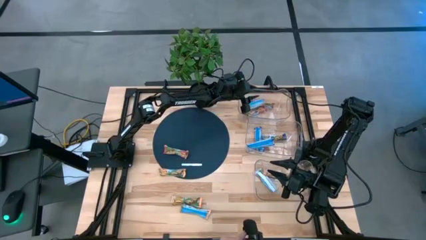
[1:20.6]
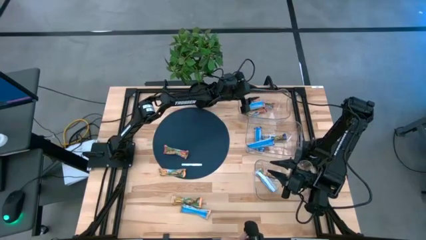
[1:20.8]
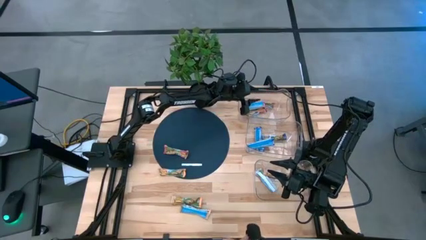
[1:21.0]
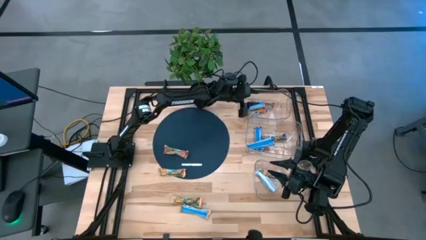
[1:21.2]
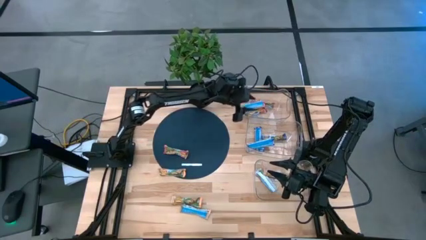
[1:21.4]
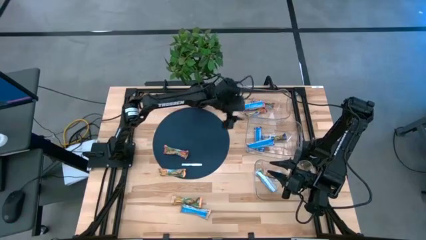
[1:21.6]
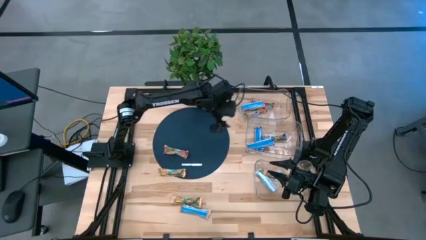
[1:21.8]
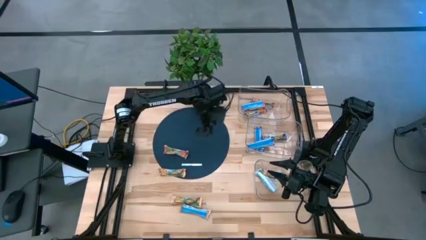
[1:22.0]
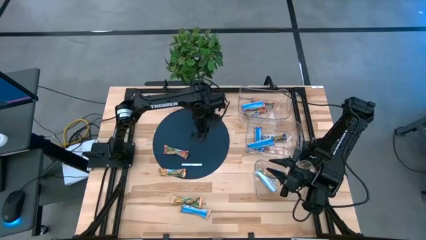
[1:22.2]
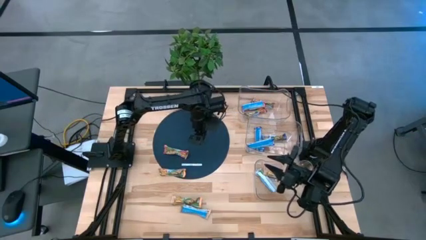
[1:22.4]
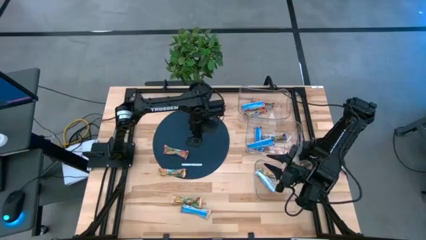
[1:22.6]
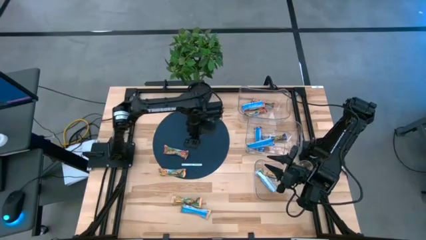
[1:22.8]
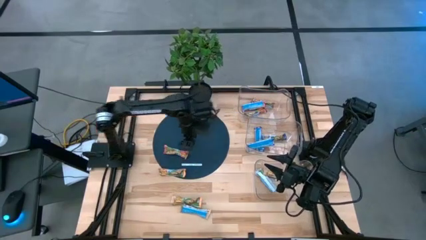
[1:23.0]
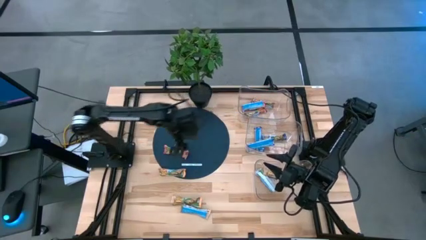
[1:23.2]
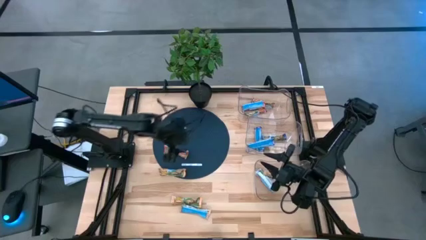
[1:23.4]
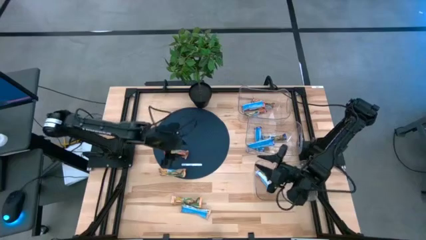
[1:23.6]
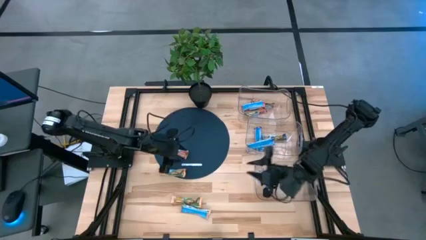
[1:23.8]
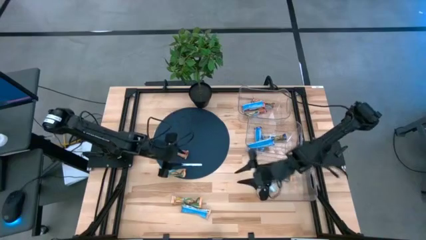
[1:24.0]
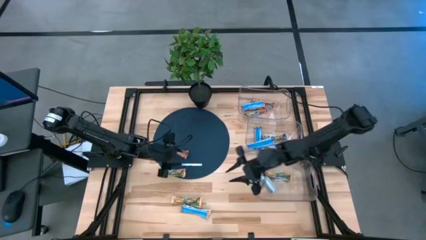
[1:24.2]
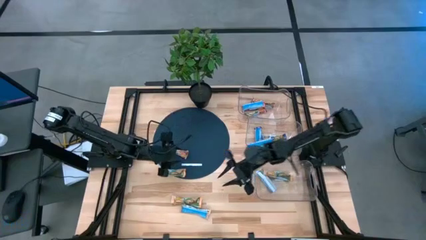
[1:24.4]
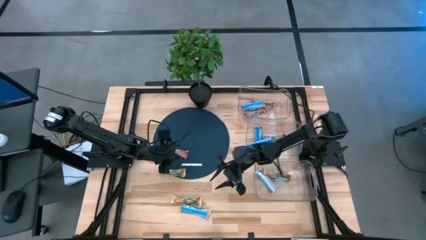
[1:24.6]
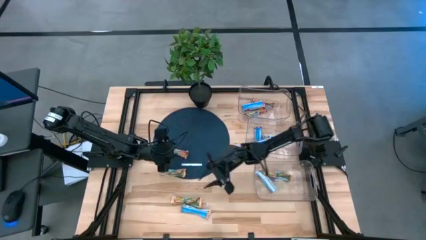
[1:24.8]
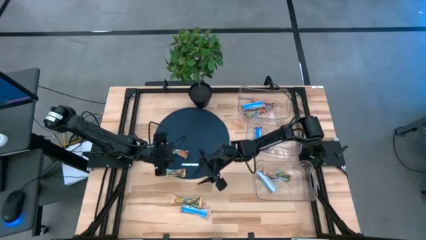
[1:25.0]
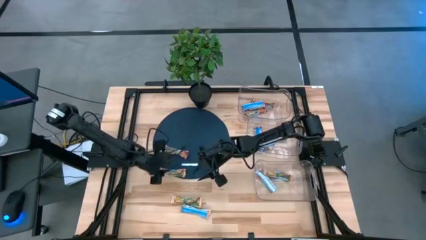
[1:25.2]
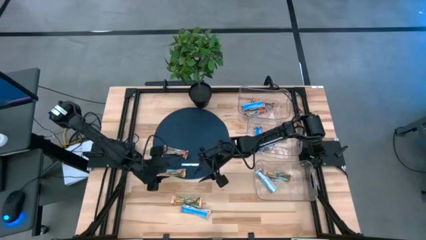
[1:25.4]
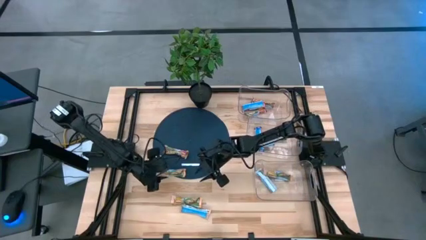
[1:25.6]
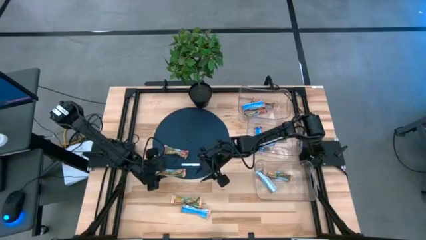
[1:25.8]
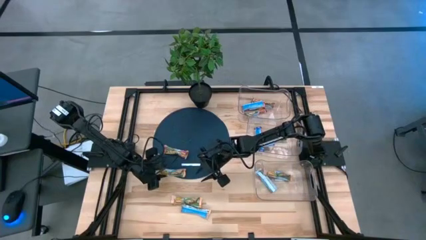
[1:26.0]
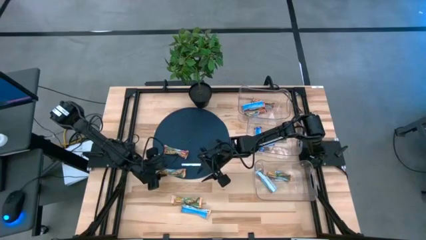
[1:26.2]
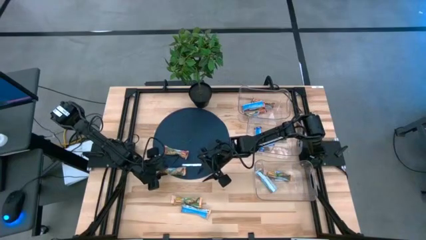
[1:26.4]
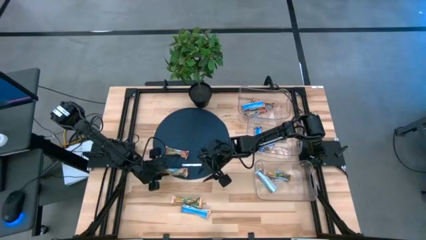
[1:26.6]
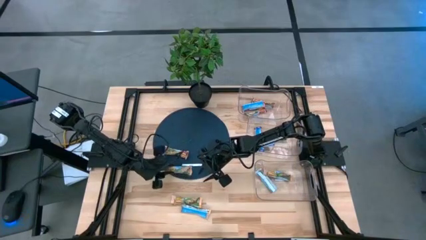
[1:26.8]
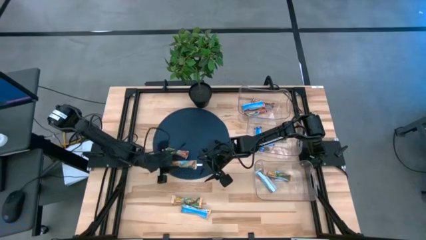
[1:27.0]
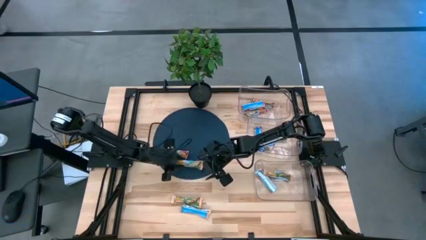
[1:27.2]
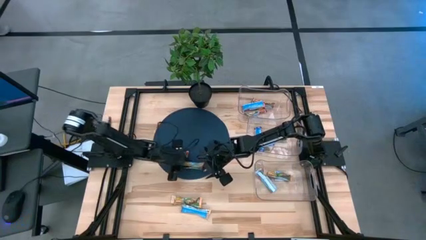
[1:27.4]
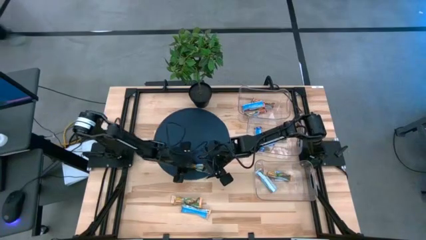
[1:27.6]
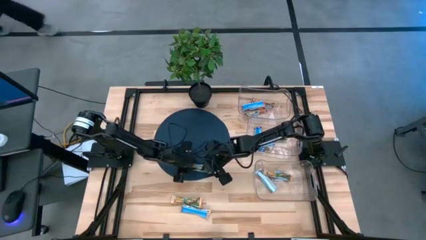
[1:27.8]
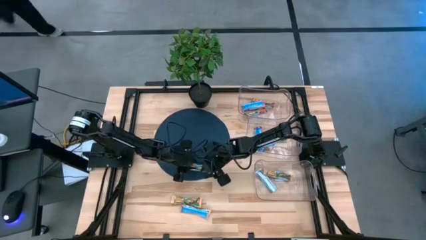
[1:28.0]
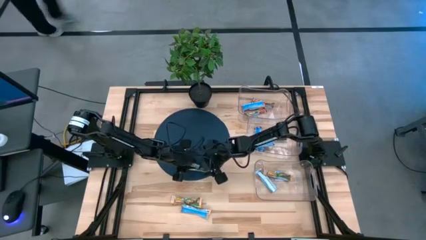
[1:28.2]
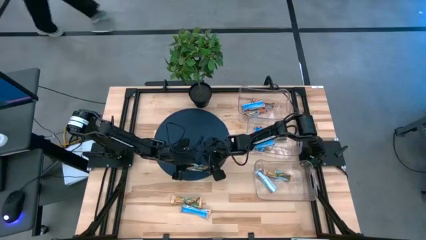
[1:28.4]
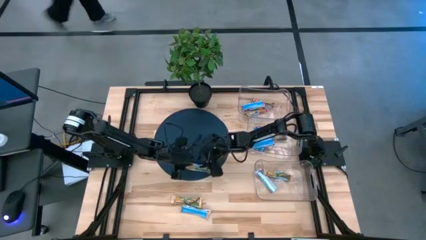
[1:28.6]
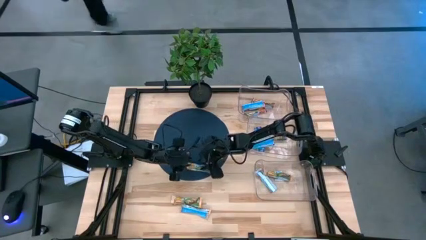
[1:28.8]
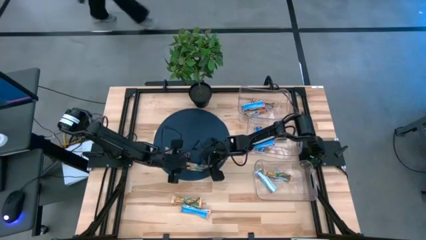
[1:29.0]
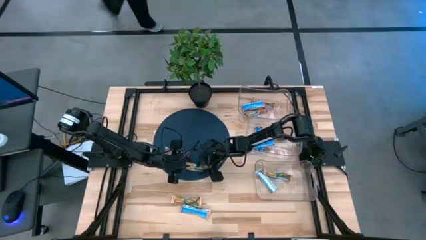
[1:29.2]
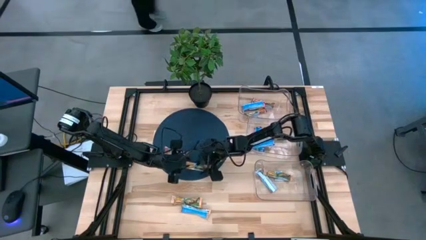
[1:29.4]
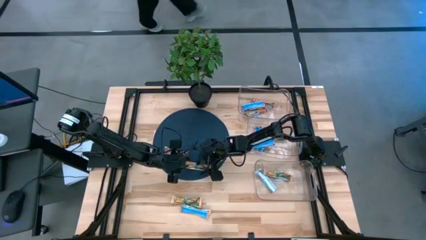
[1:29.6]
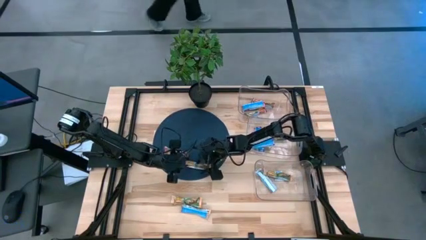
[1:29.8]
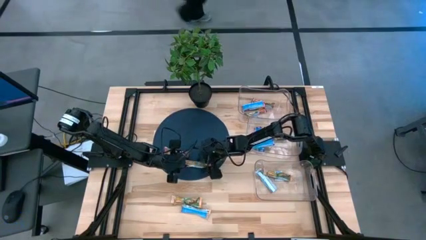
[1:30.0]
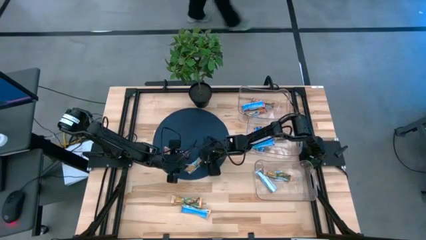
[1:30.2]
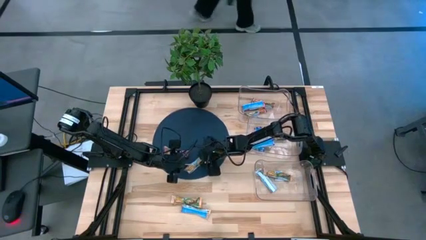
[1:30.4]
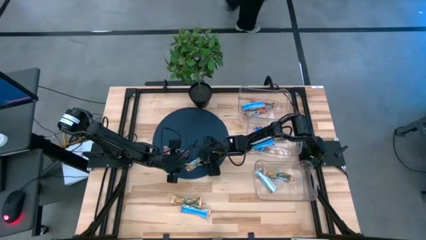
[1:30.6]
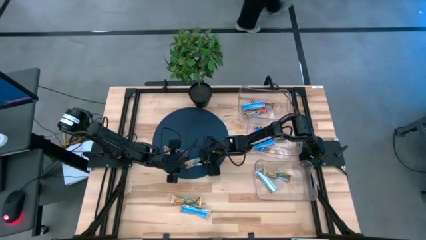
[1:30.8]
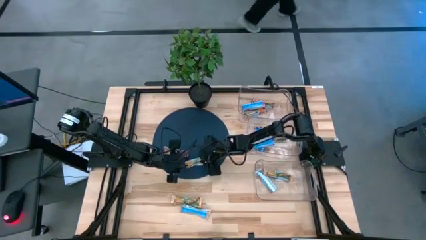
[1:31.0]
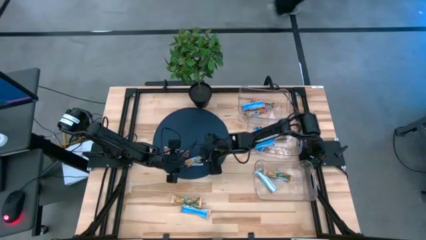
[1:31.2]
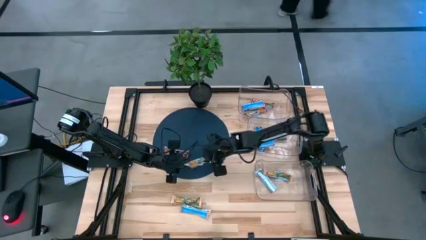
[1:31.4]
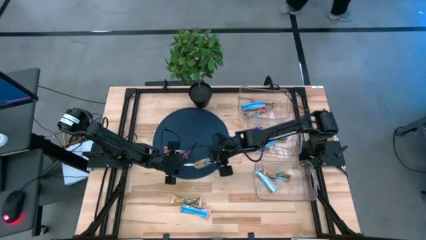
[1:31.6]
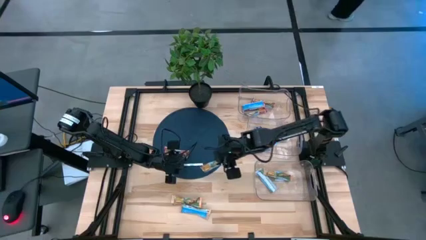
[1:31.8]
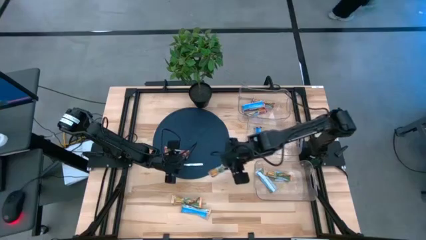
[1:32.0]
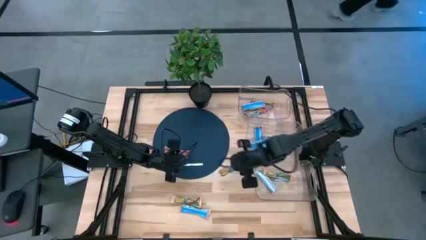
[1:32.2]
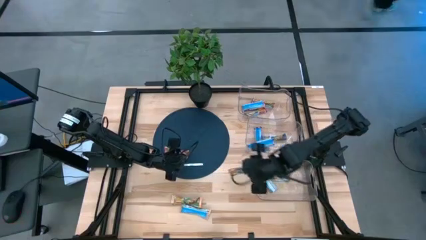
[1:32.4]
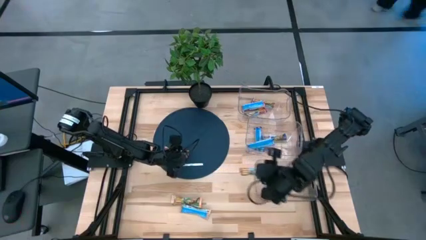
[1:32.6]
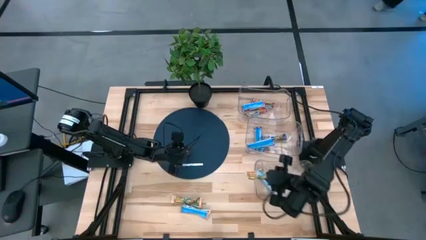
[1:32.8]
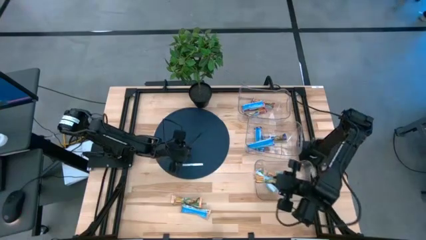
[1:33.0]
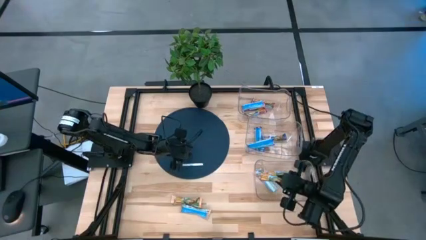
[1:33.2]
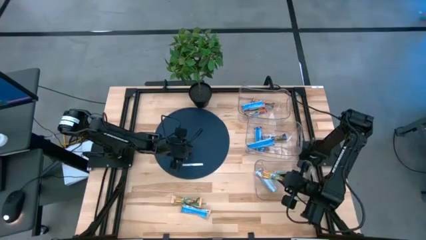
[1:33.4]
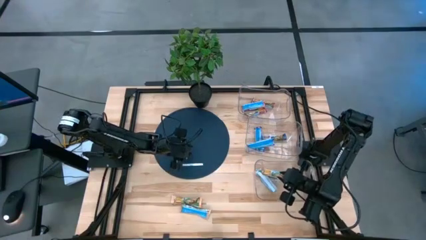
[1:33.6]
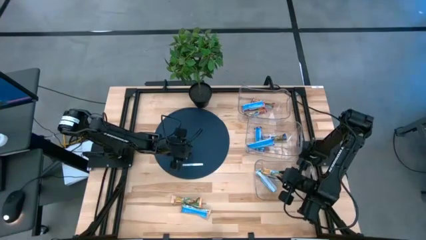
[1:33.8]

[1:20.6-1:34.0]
Task: Pick and place Granola Bars by type
Put the yellow granola bar into the bottom transparent bin

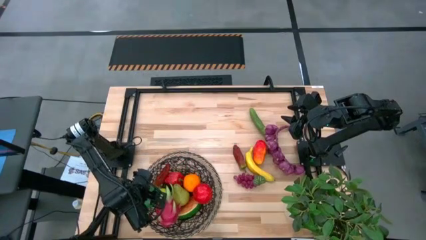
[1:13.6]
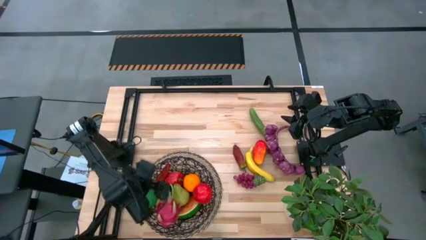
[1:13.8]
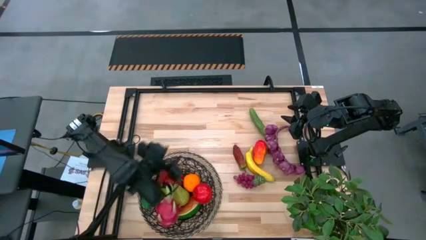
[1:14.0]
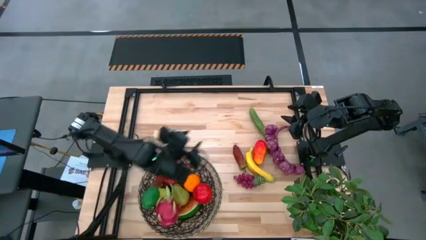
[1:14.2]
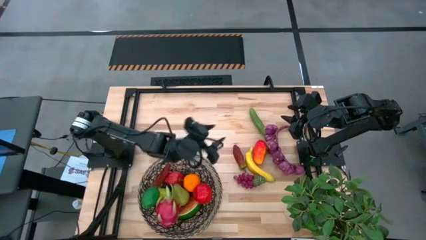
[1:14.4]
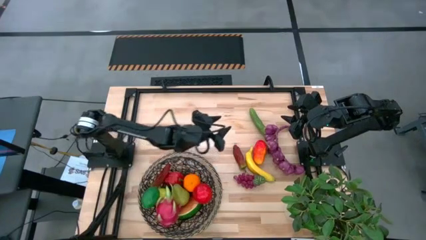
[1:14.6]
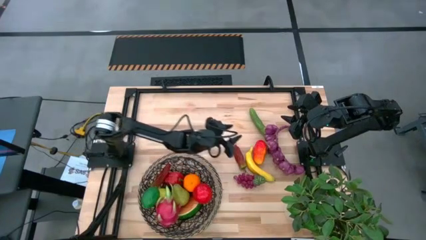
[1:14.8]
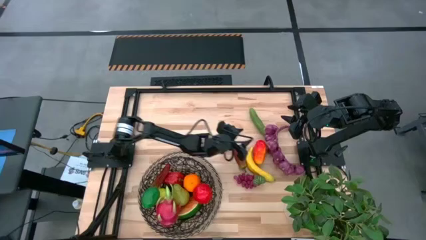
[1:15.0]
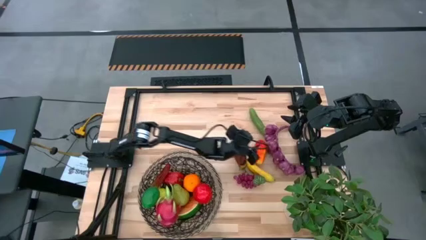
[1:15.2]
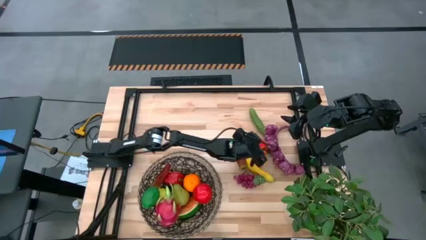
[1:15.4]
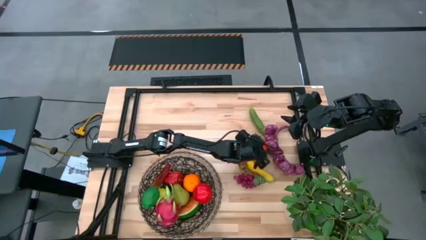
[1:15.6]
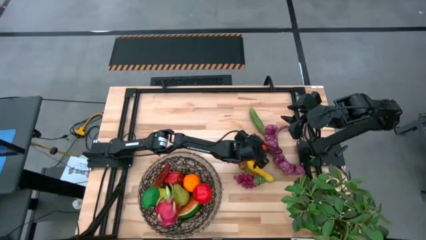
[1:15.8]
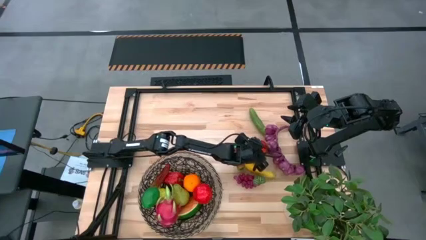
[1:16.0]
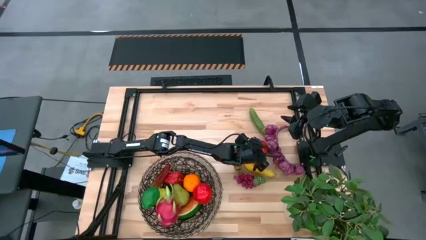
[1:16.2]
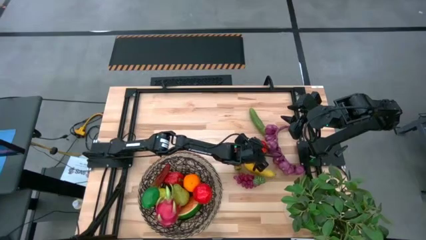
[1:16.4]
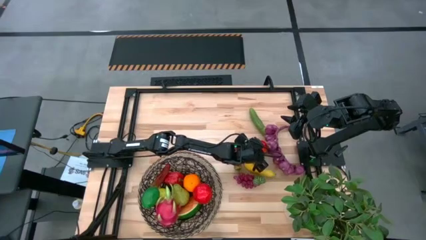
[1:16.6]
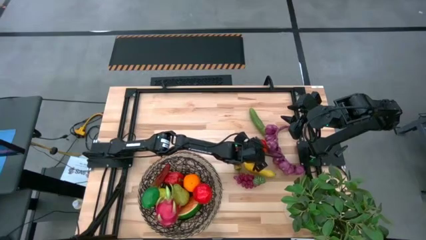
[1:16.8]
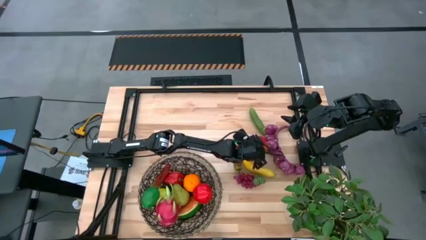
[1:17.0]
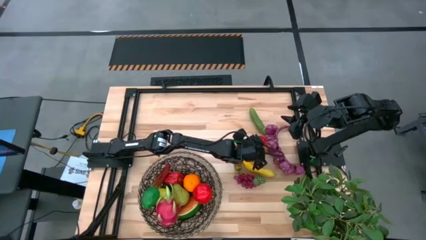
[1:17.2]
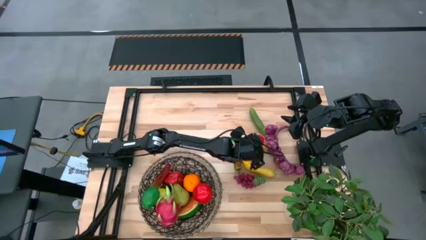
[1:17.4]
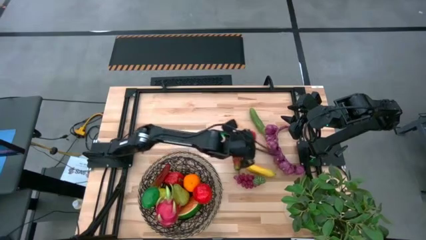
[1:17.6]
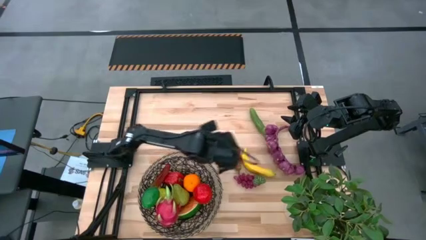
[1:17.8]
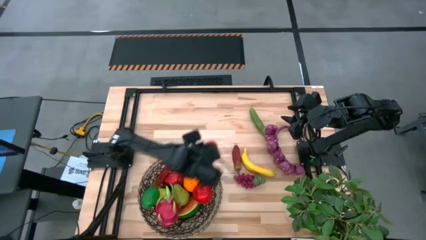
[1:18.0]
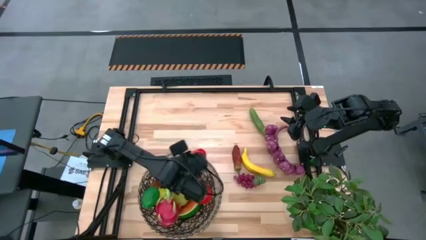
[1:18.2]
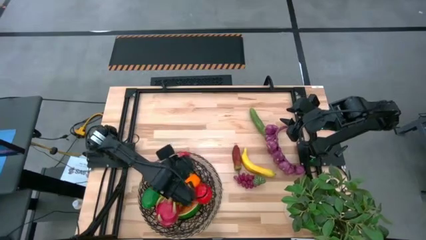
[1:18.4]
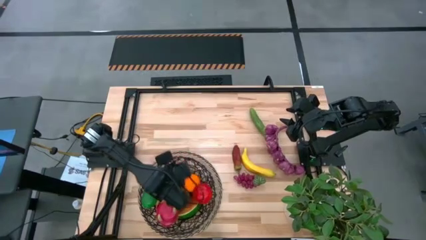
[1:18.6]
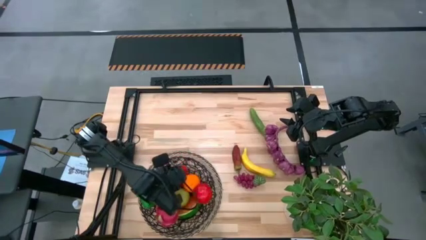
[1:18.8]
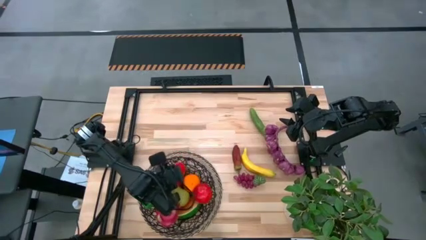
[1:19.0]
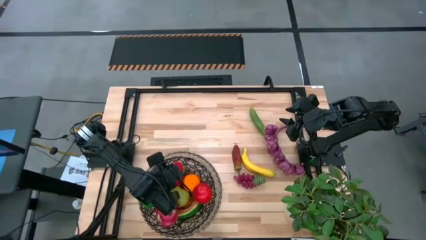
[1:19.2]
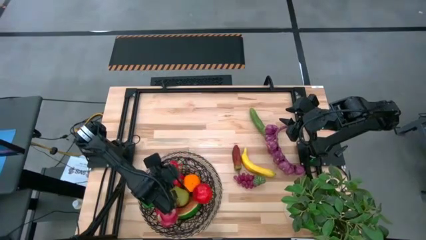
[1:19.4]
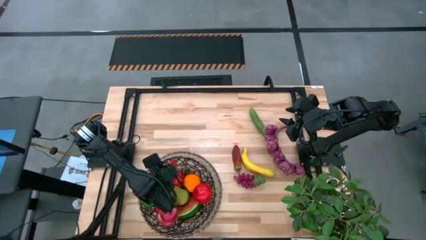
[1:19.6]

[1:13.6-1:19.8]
Task: Build produce basket
Put the mango into the woven basket
